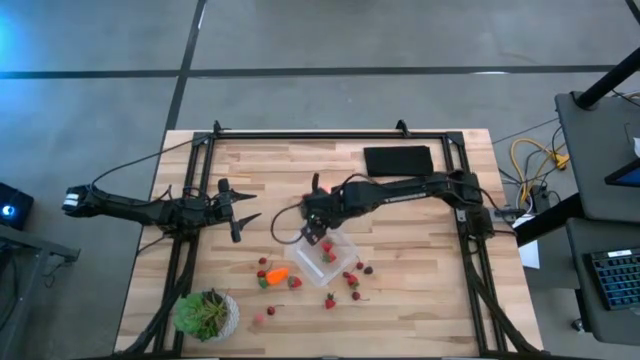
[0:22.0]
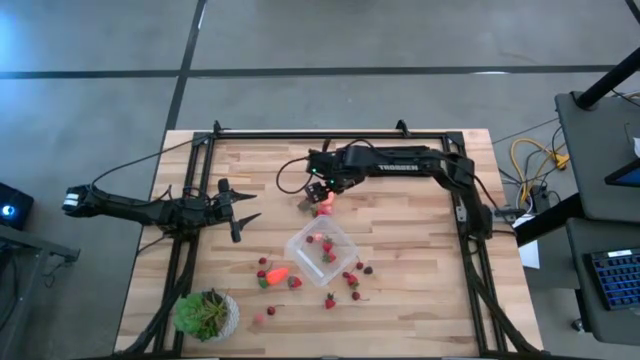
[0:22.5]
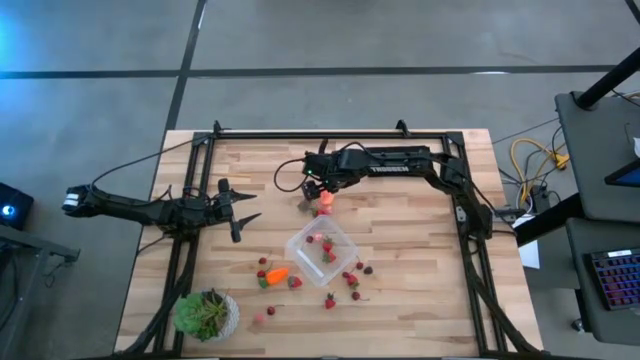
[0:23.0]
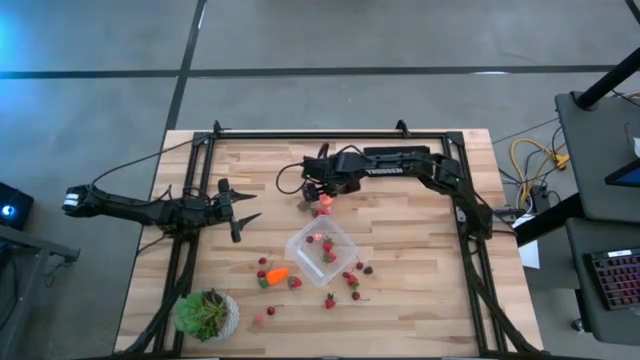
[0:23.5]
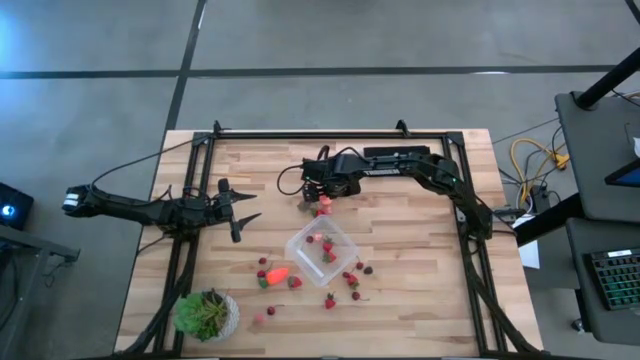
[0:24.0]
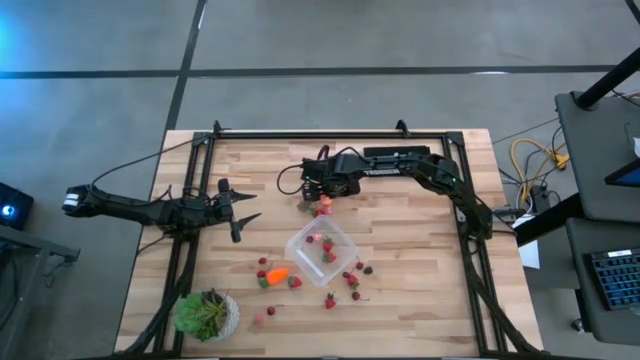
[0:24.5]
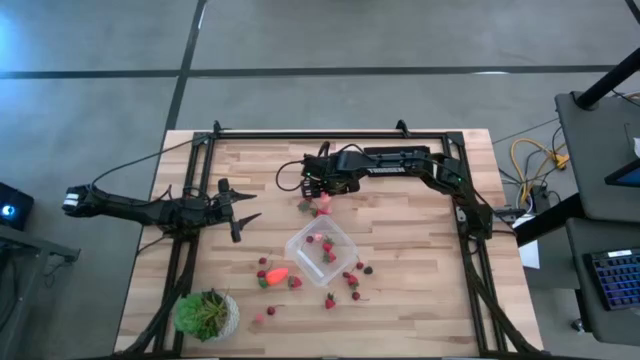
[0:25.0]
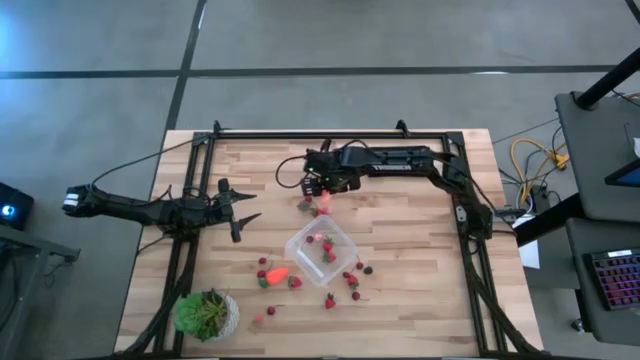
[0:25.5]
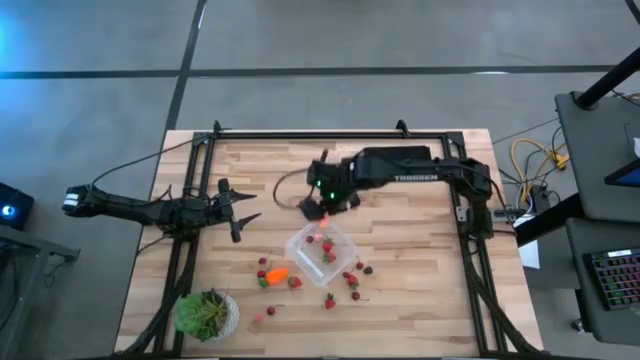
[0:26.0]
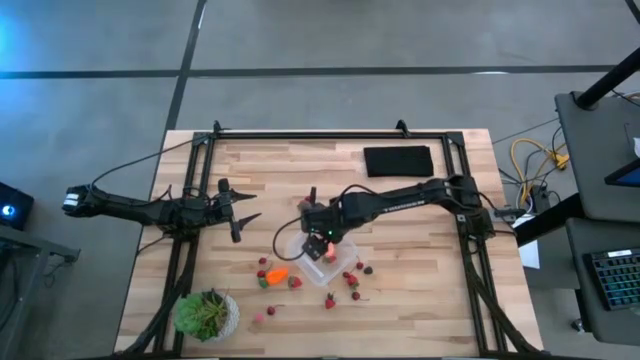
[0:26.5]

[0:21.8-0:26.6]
Task: Pick and placing Produce into tupperware
Put the pink peach into the transparent container

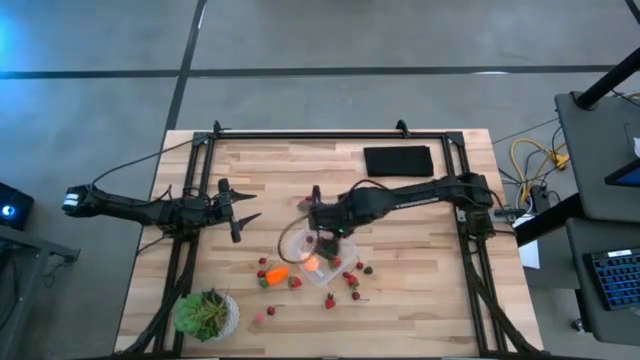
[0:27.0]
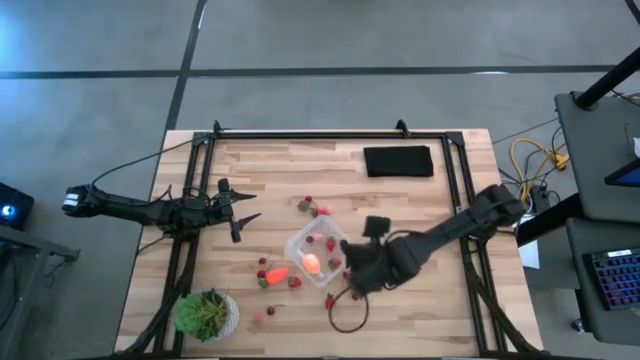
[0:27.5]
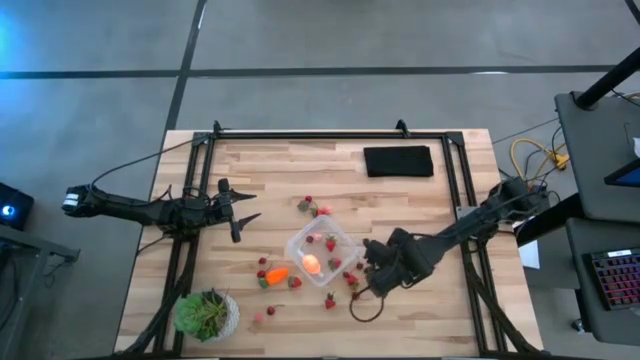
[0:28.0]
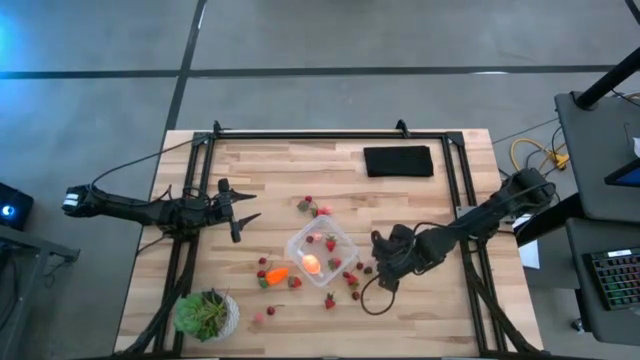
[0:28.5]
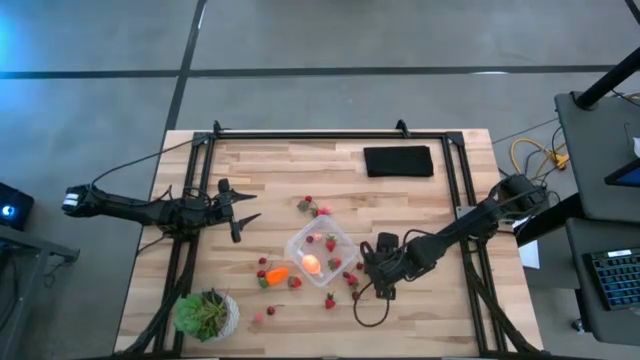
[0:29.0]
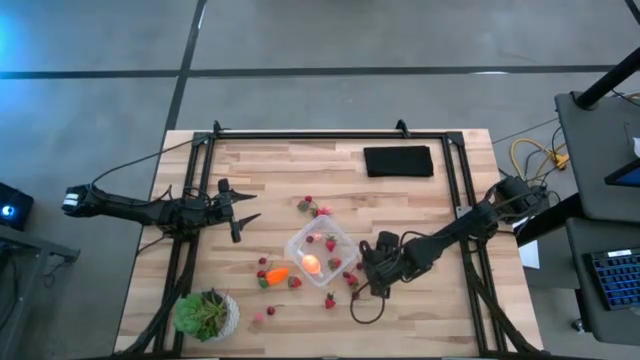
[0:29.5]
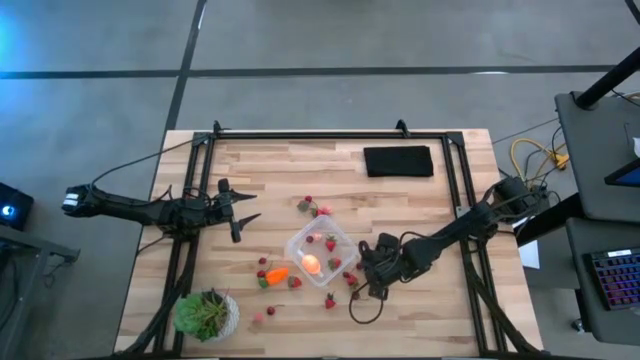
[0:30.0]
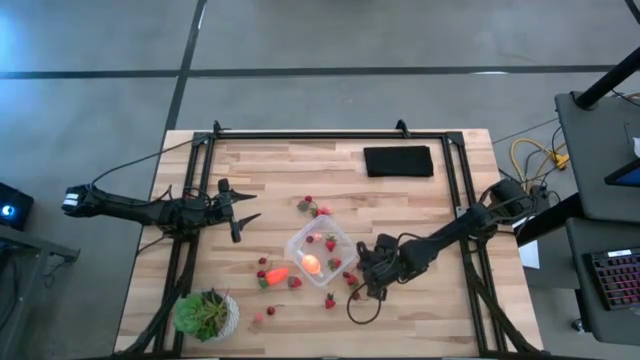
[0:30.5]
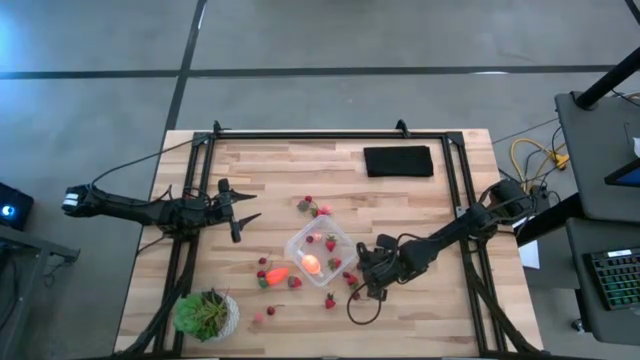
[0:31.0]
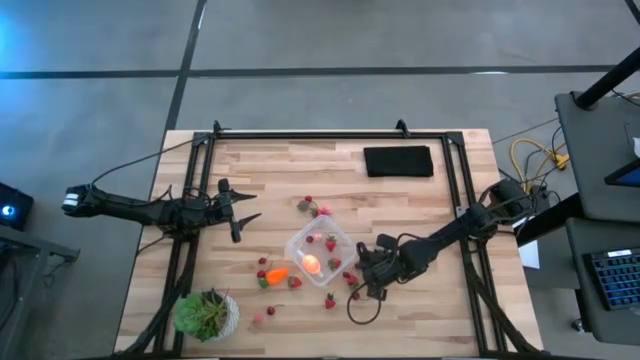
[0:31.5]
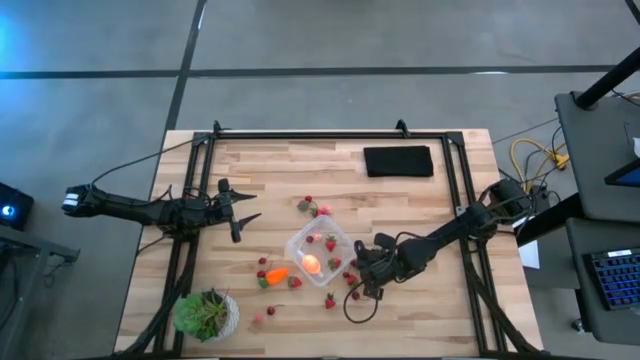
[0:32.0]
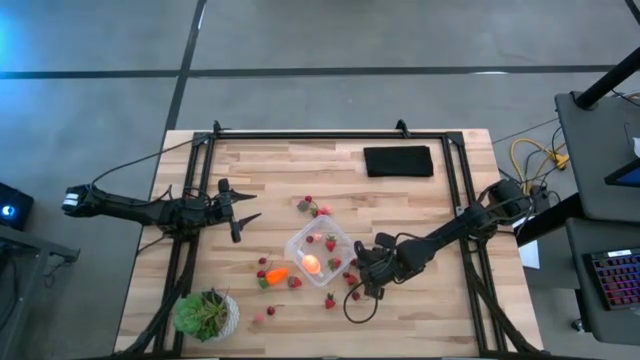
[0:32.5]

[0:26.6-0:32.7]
Put the blackberry into the transparent container

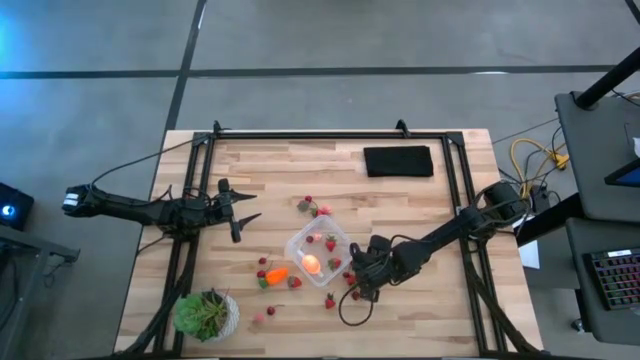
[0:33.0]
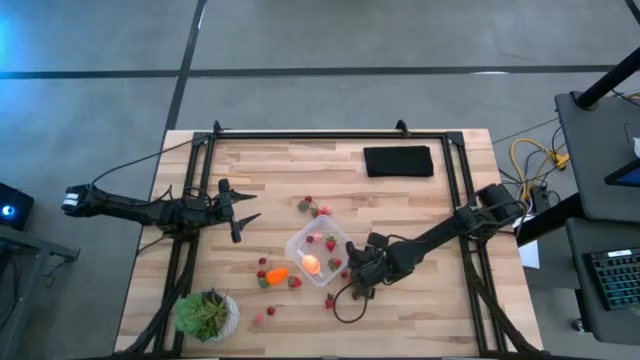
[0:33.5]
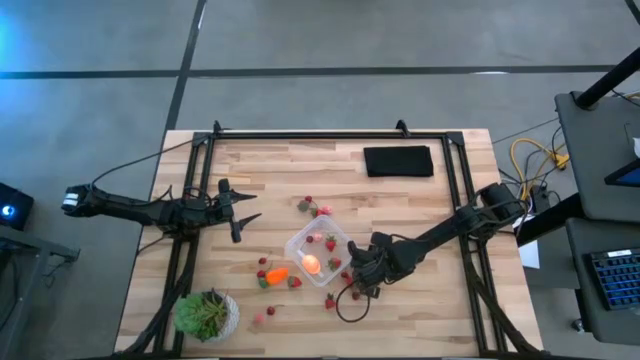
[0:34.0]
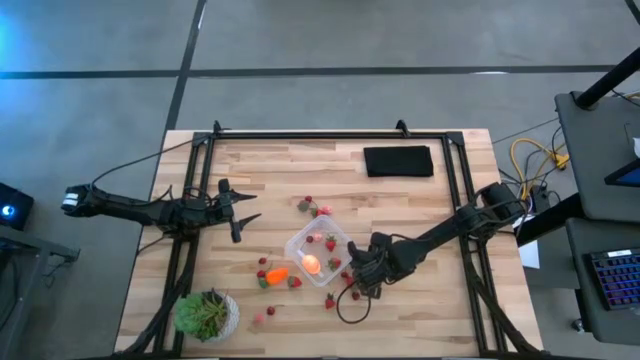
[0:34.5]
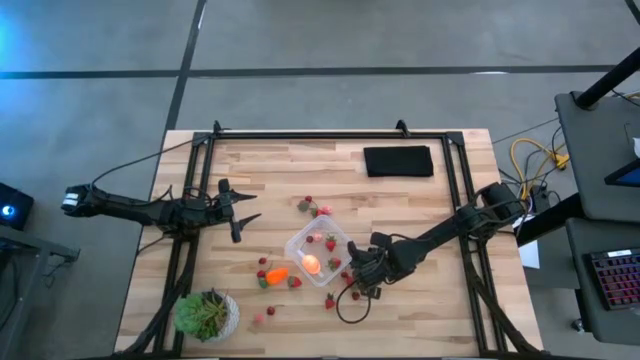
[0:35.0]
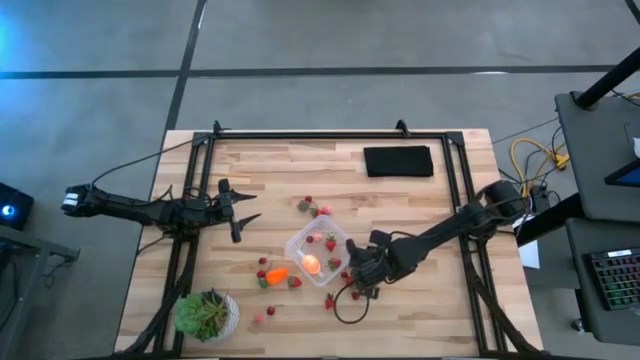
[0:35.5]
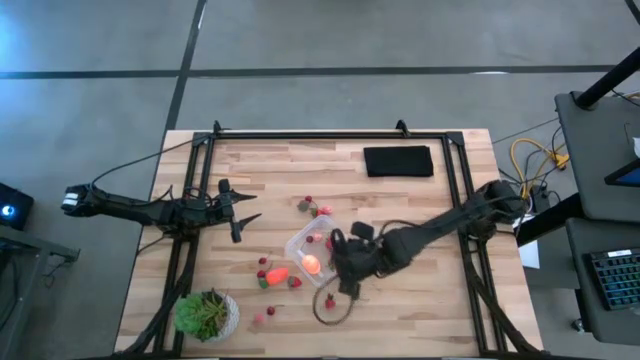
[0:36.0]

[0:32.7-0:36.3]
Put the blackberry into the transparent container

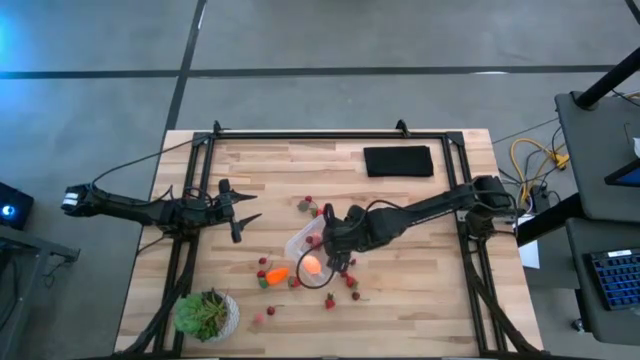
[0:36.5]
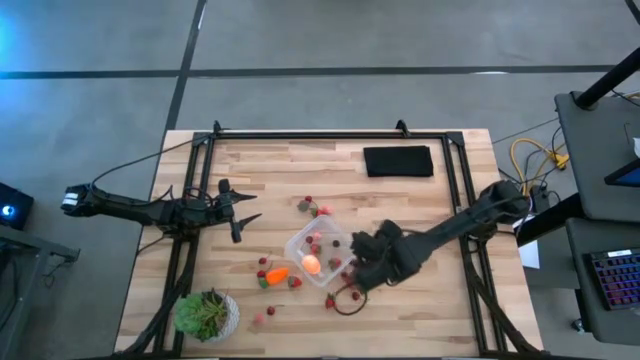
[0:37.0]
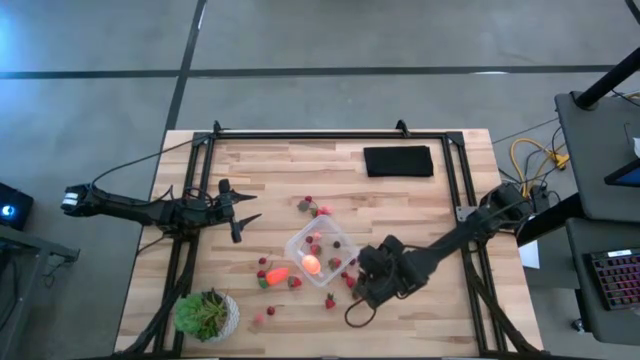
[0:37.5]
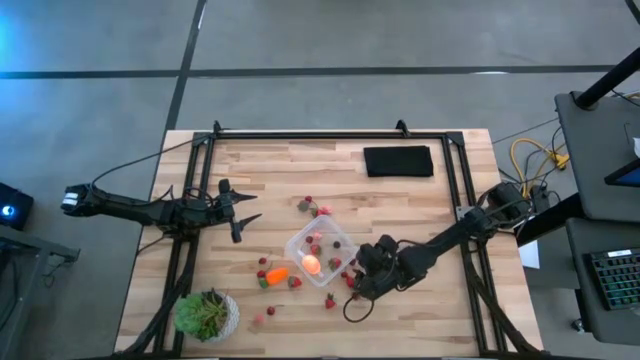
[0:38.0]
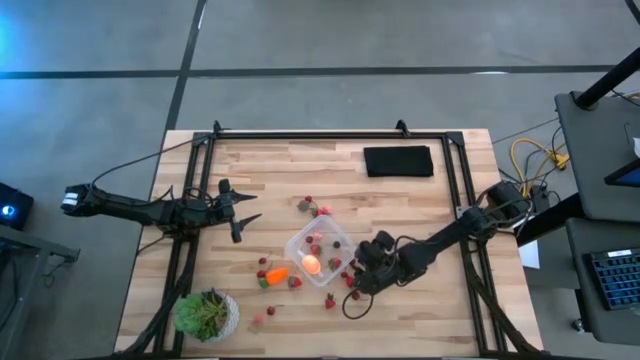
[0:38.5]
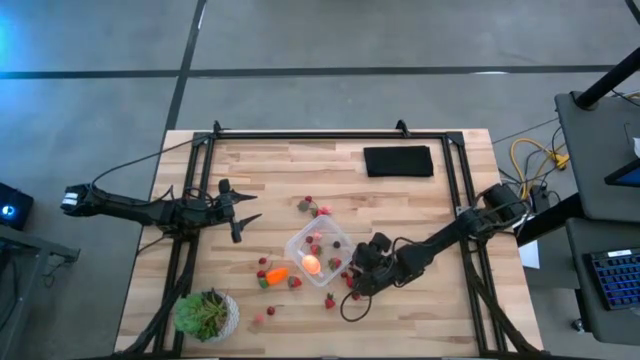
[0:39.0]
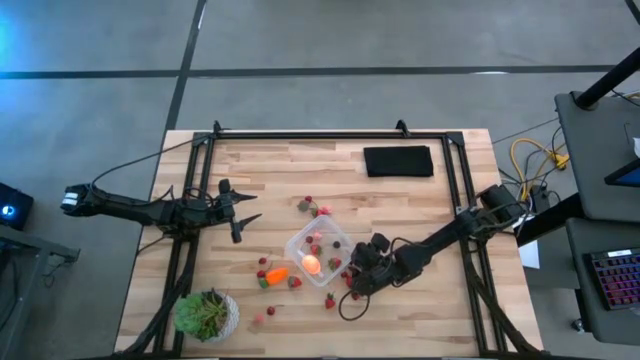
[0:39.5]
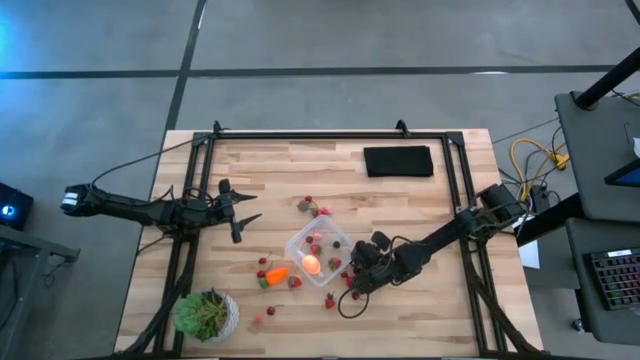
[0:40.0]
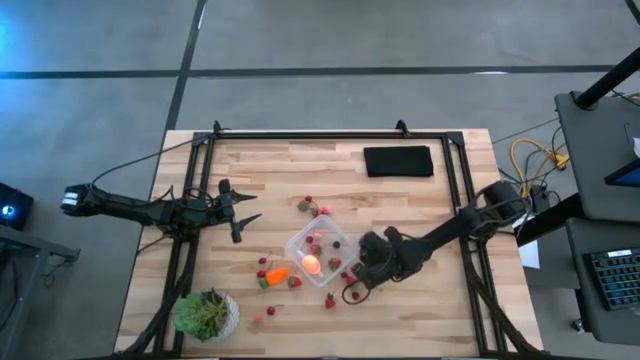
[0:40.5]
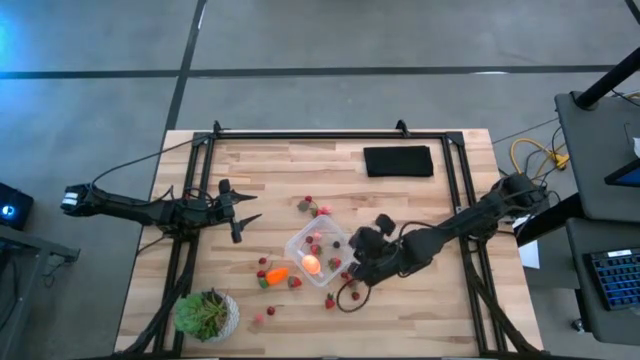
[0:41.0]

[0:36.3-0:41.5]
Put the red cherry into the transparent container
